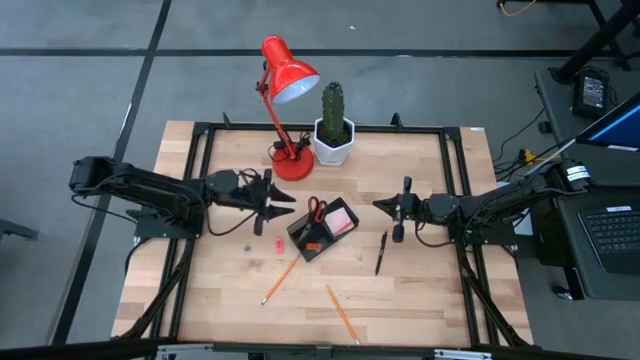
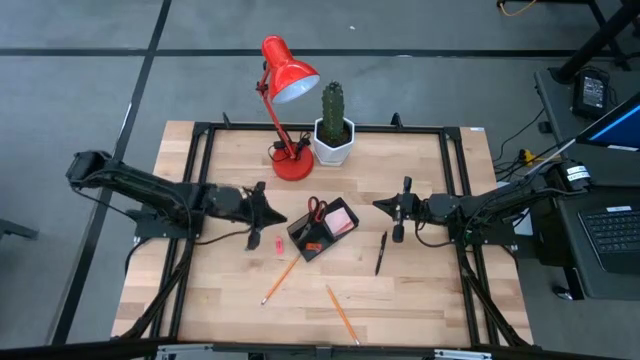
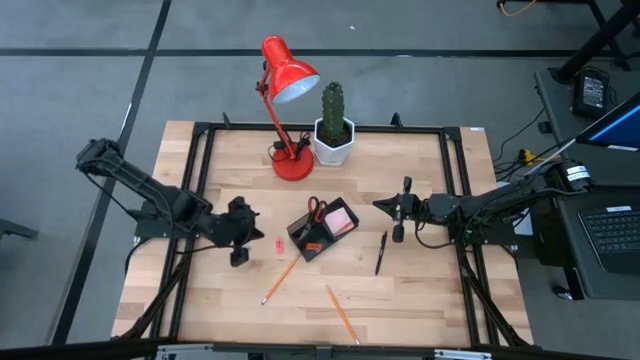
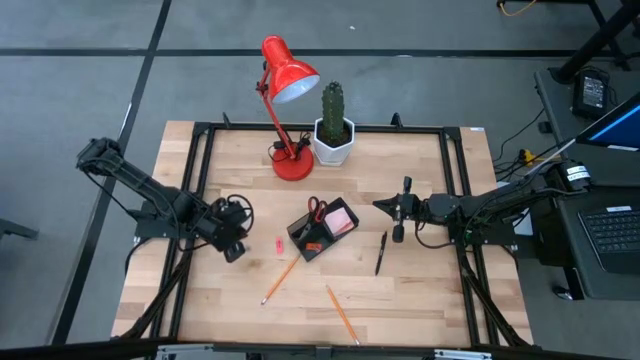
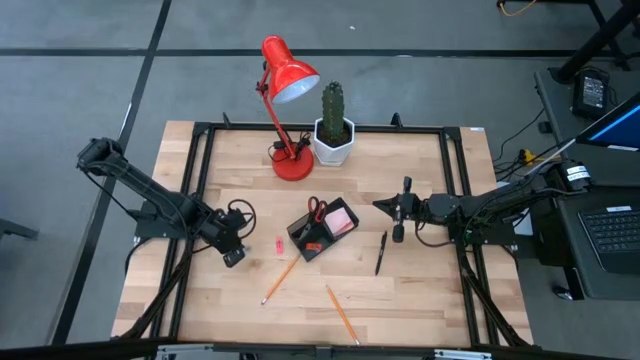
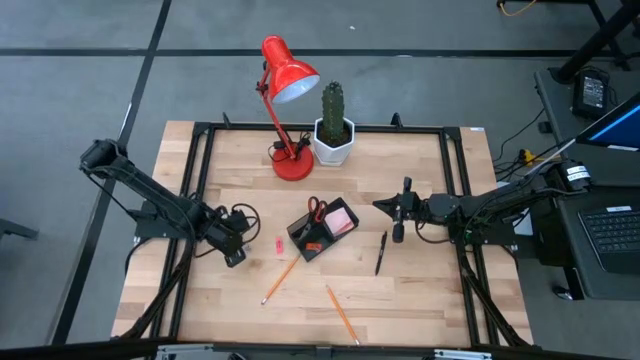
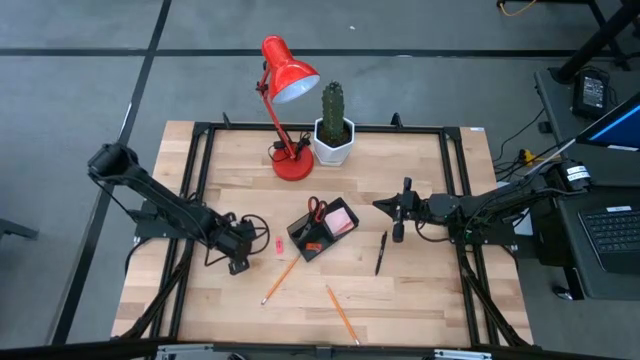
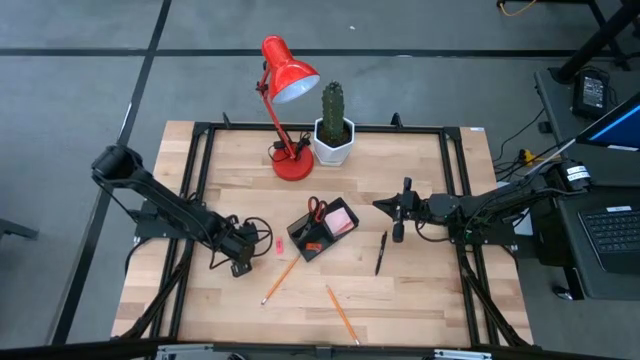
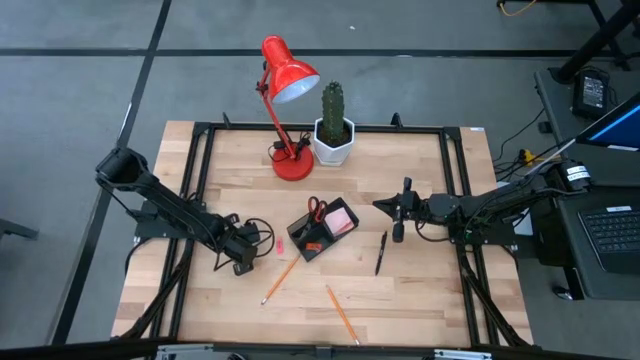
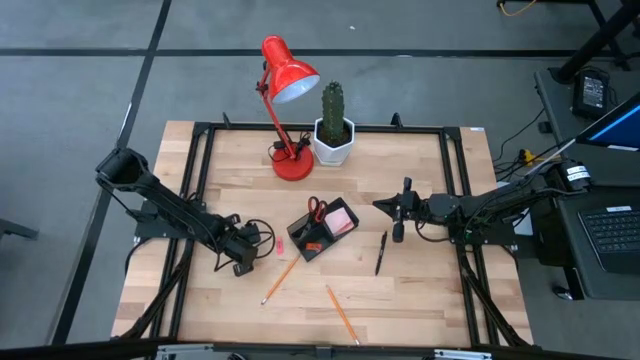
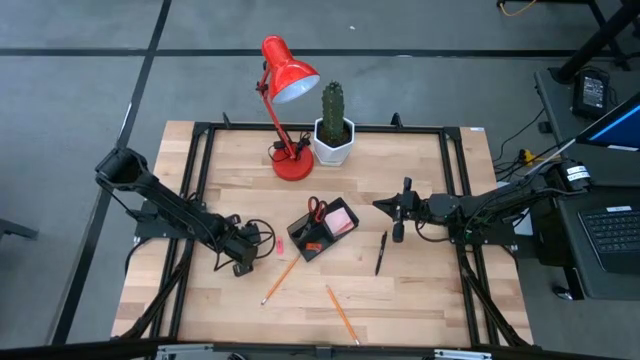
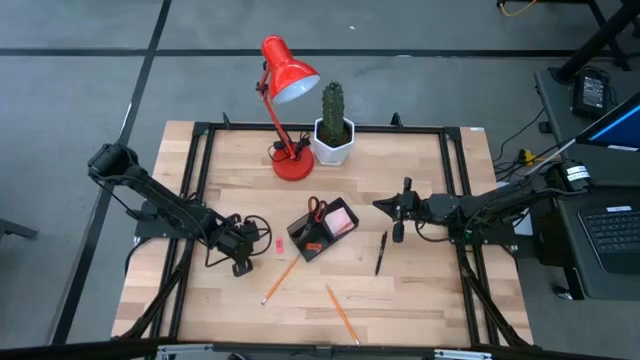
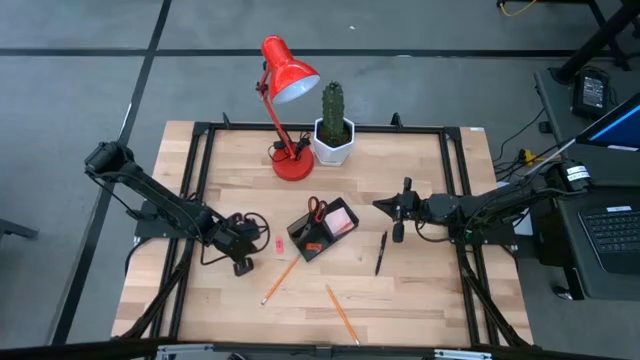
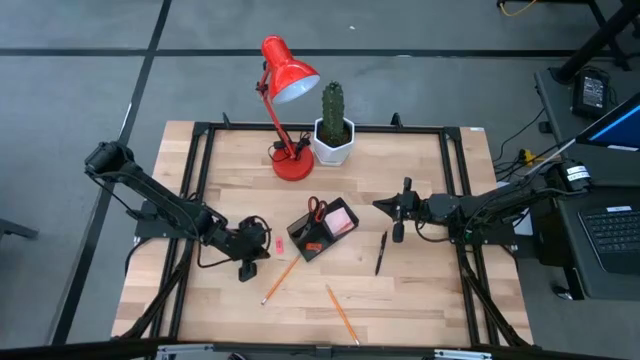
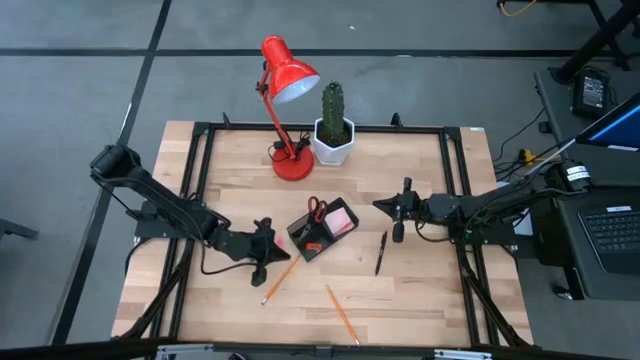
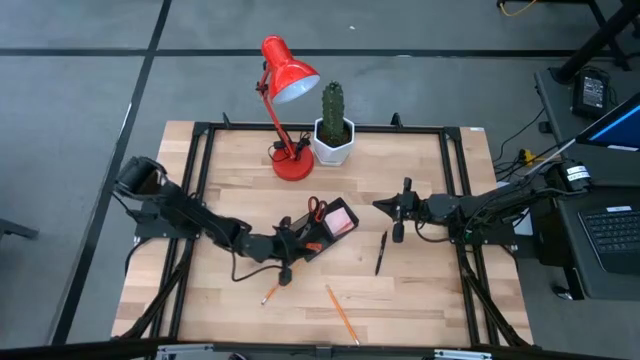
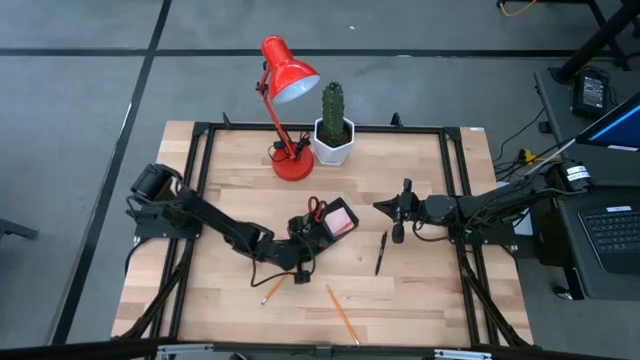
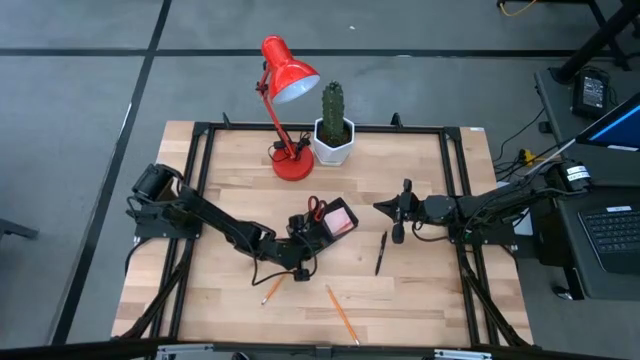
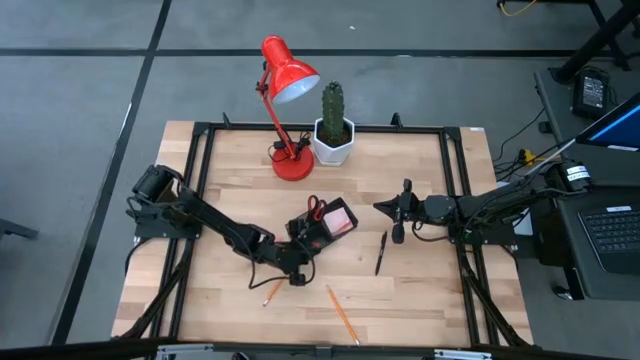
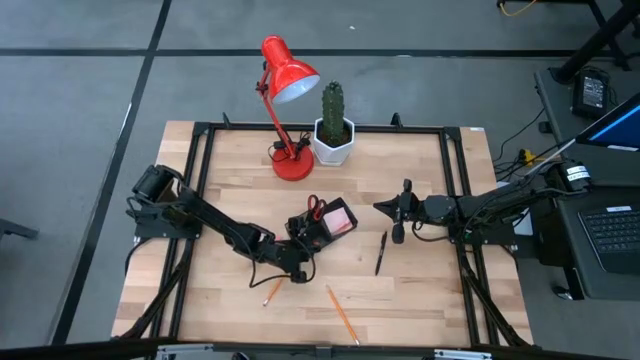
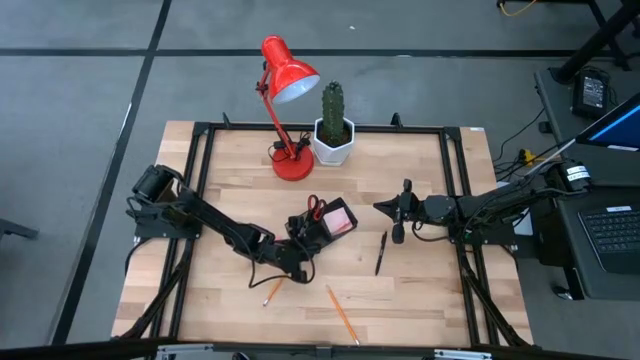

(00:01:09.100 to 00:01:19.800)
Task: Pick and place office supplies into organizer
Put the blue binder clip into the black desk organizer

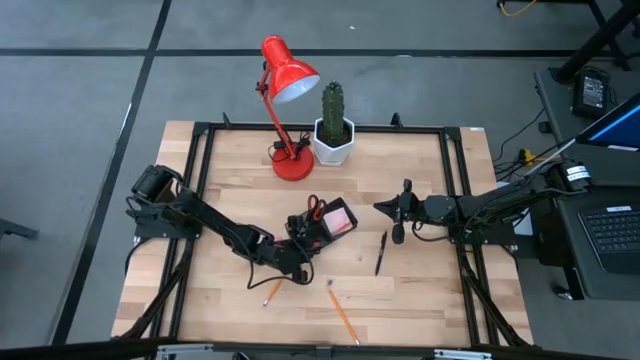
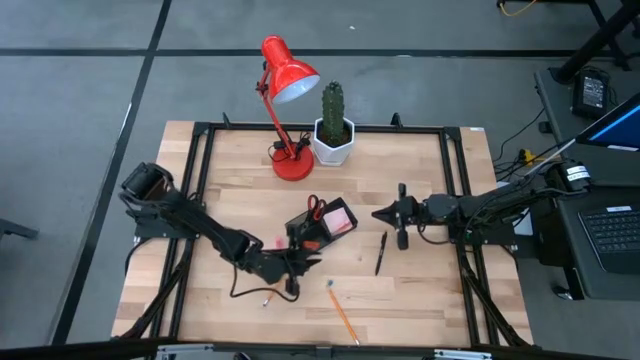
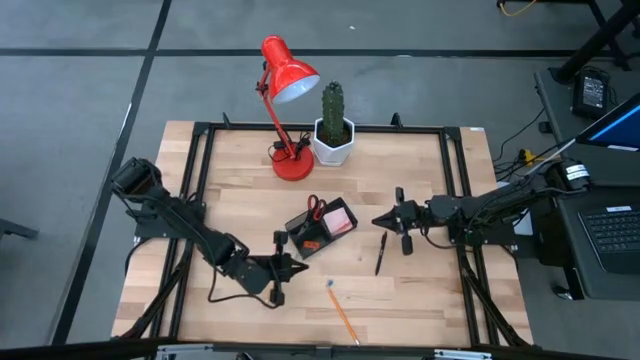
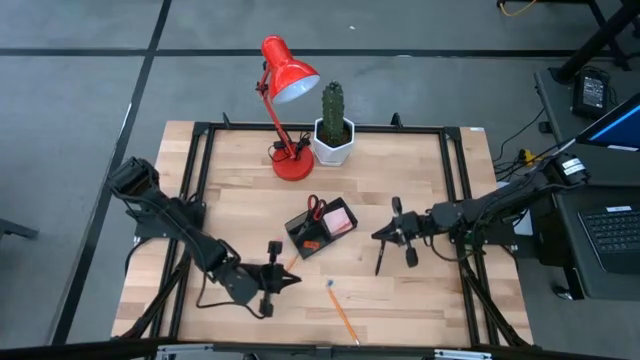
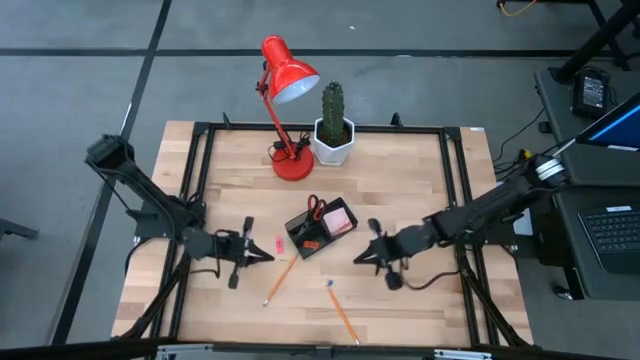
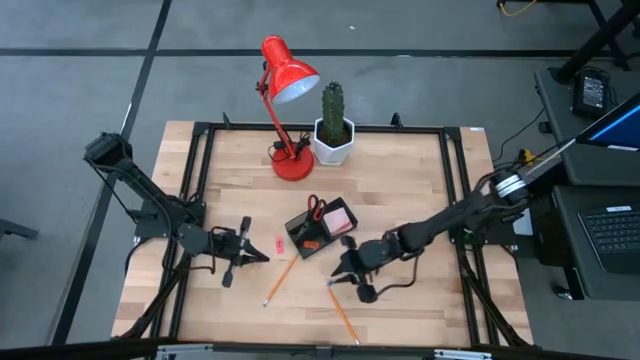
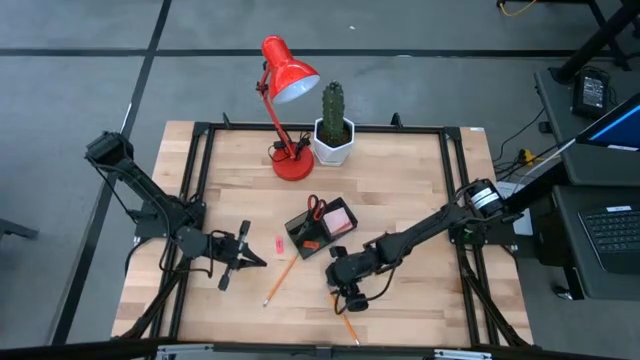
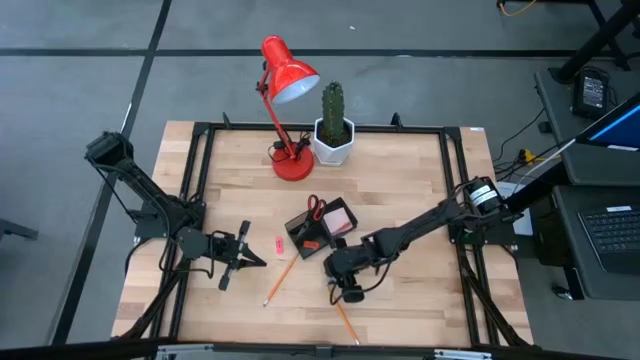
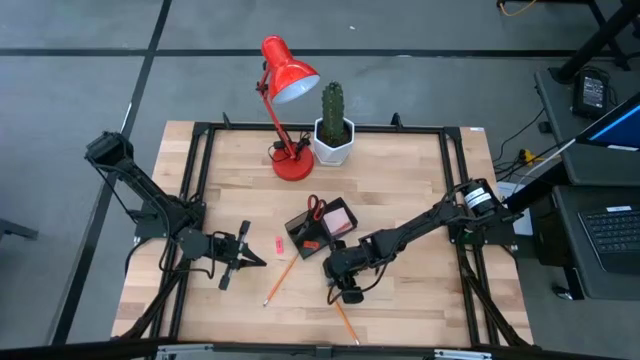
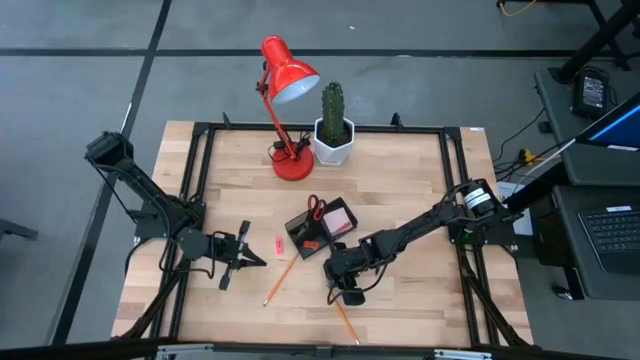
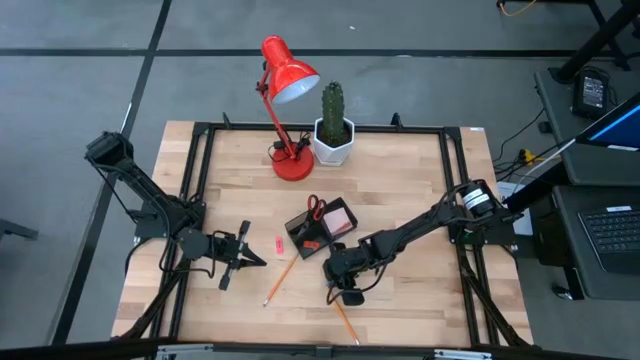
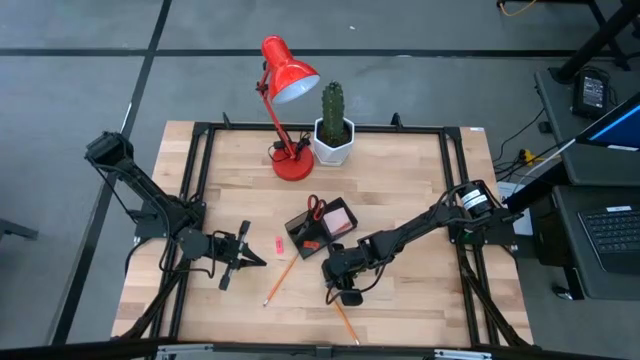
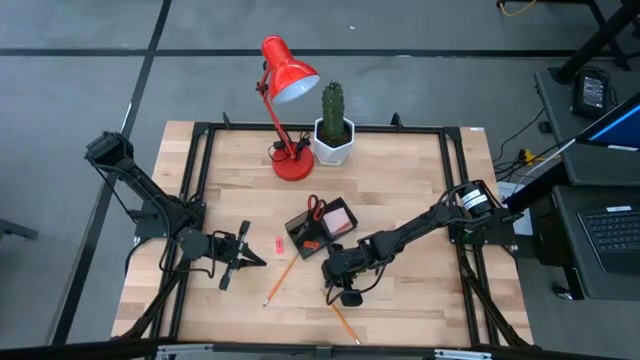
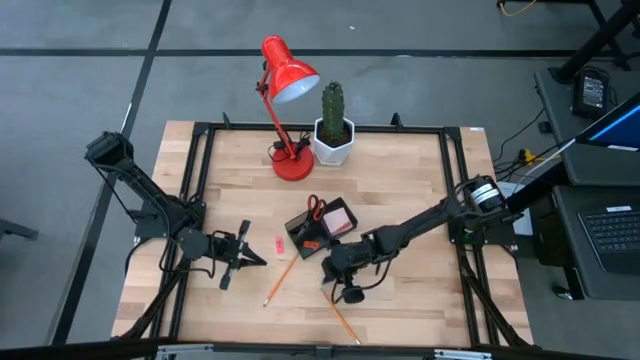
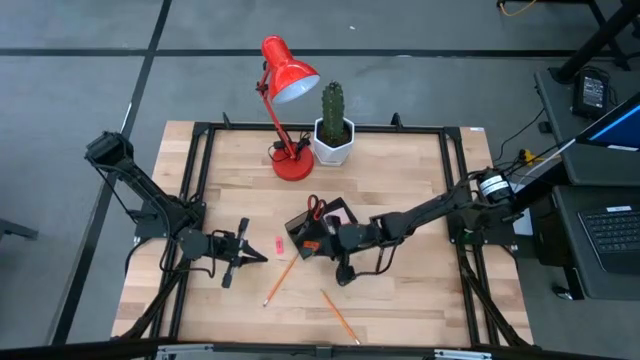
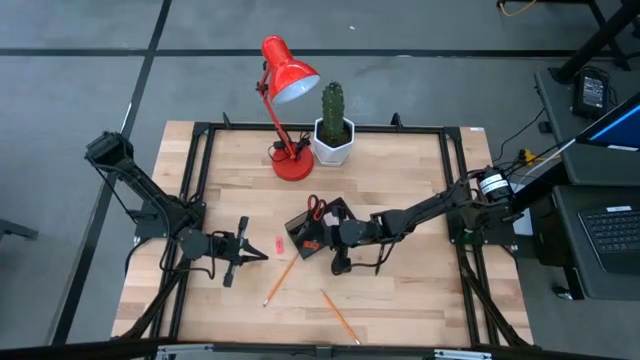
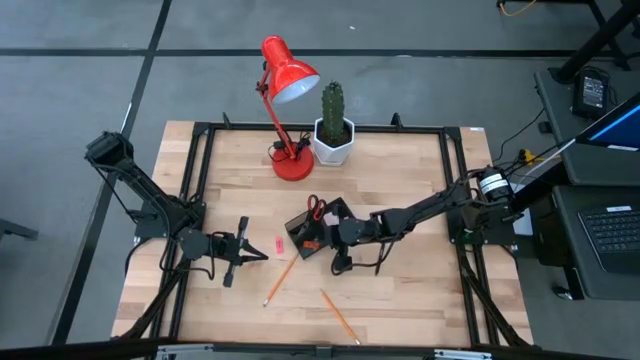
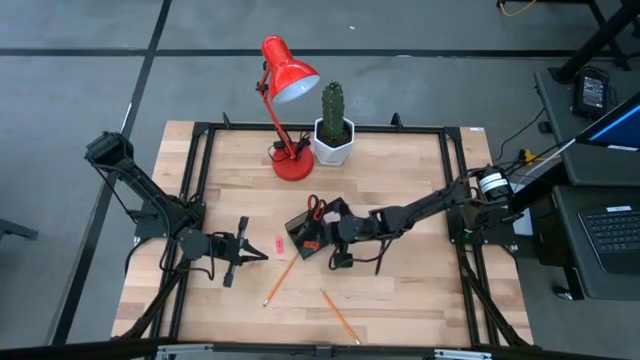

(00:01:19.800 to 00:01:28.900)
Put the blue binder clip into the black desk organizer
